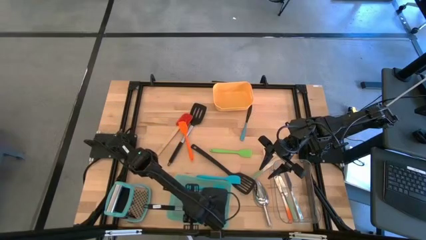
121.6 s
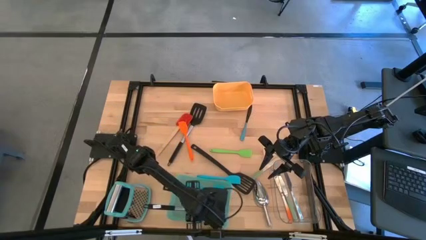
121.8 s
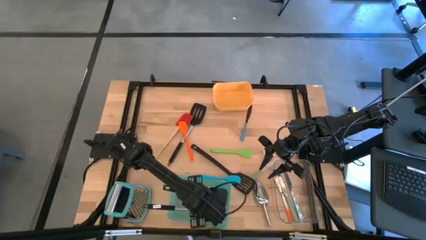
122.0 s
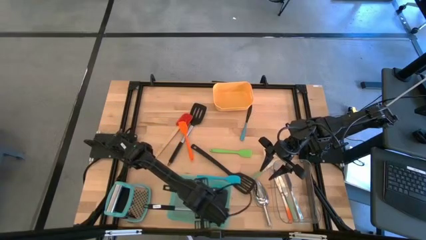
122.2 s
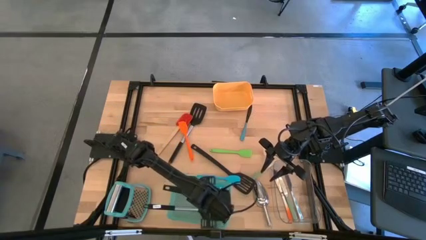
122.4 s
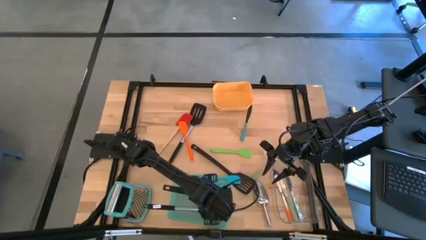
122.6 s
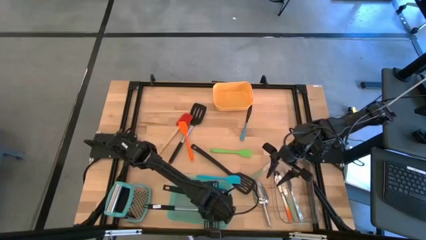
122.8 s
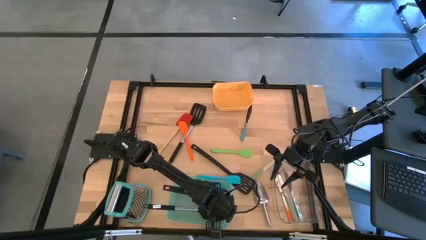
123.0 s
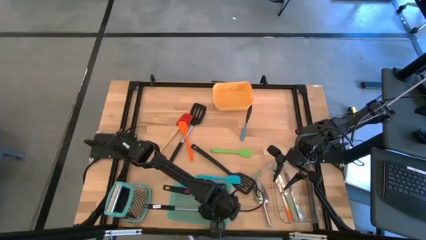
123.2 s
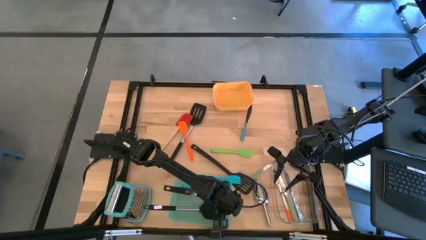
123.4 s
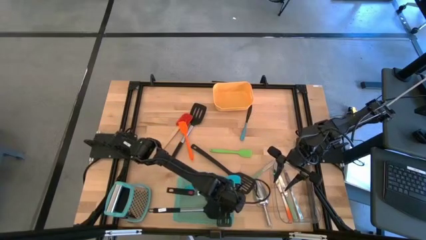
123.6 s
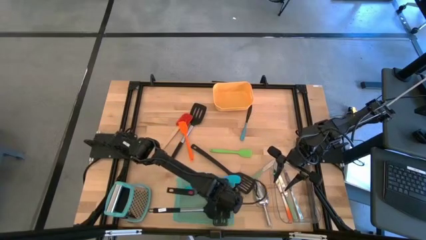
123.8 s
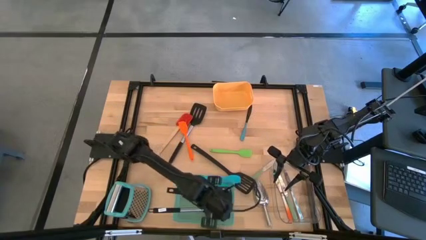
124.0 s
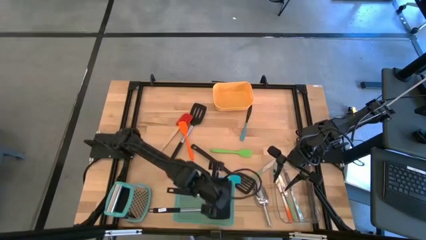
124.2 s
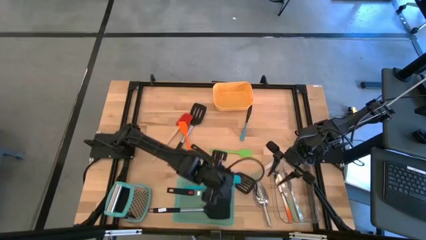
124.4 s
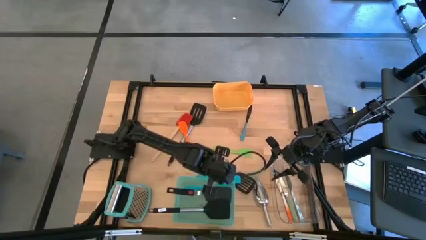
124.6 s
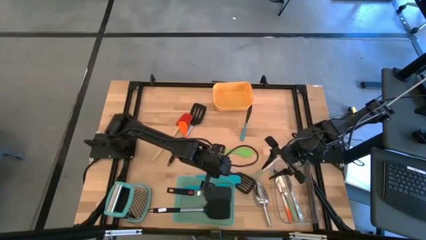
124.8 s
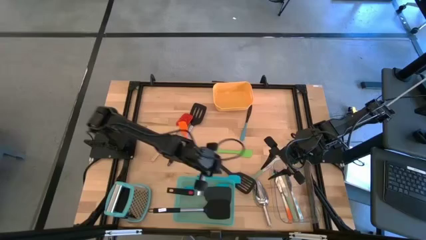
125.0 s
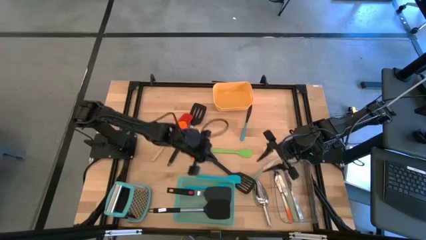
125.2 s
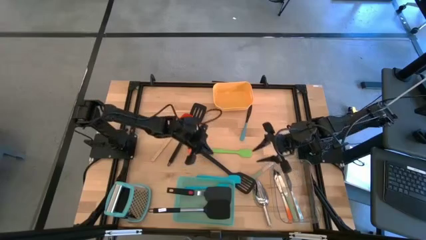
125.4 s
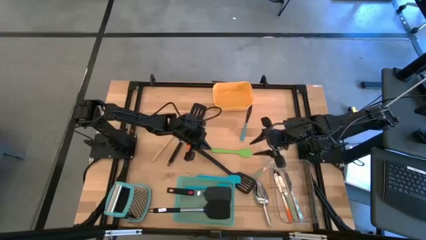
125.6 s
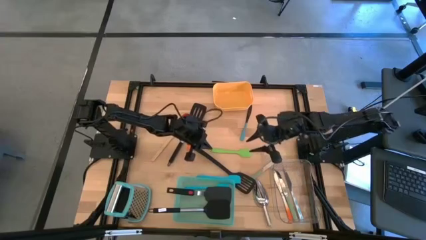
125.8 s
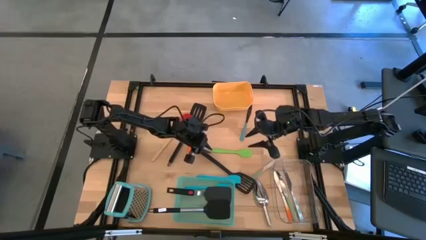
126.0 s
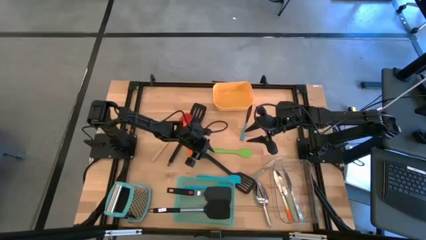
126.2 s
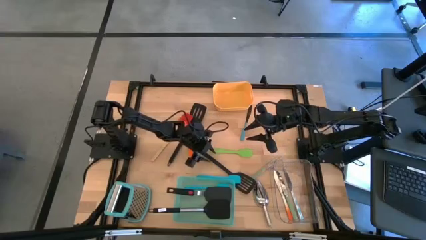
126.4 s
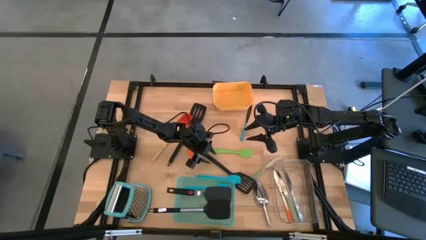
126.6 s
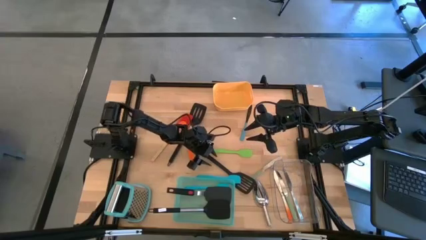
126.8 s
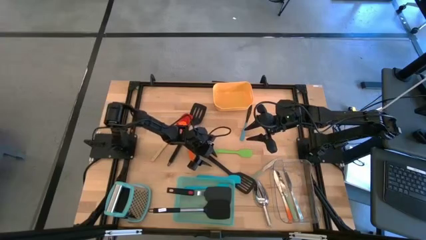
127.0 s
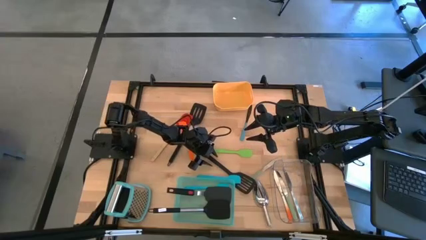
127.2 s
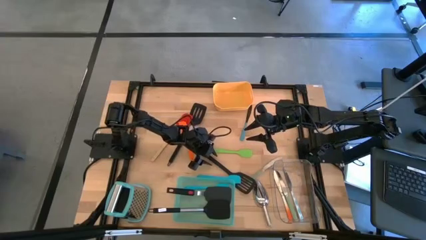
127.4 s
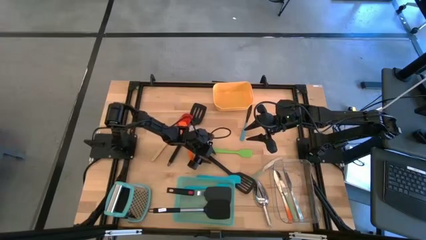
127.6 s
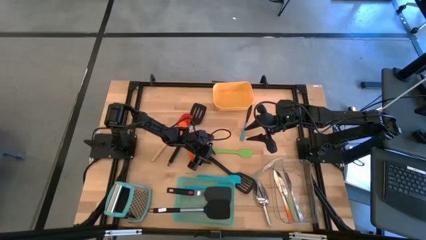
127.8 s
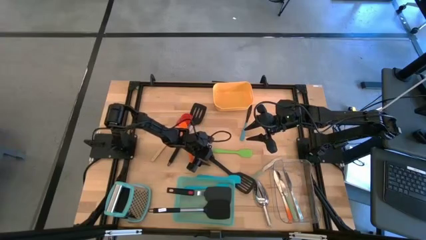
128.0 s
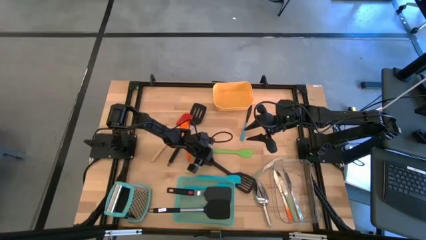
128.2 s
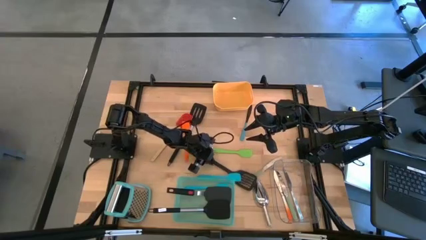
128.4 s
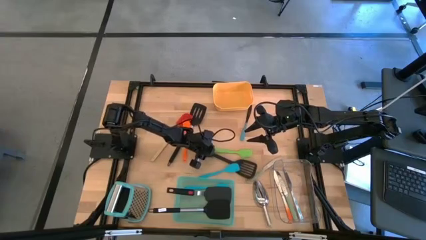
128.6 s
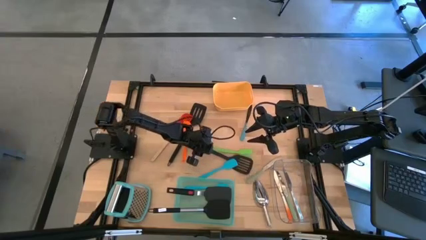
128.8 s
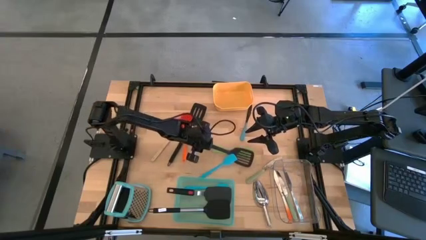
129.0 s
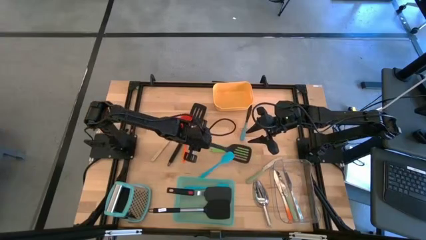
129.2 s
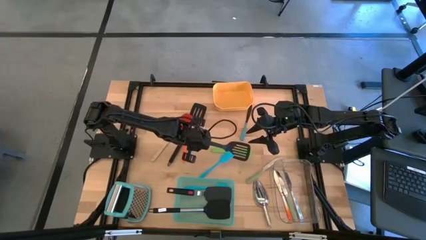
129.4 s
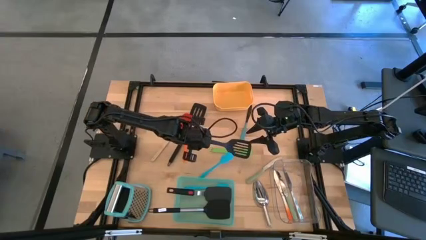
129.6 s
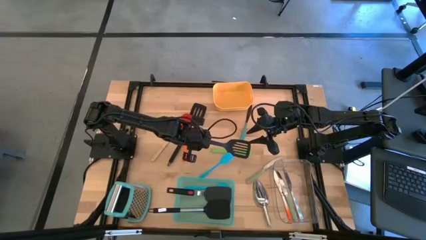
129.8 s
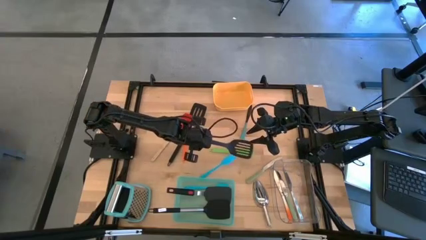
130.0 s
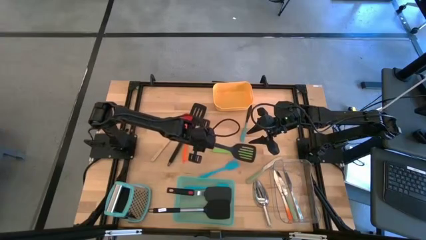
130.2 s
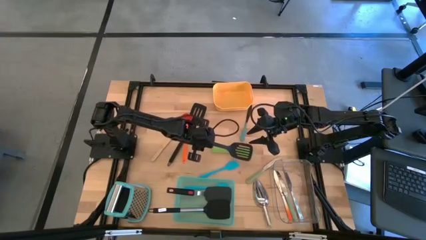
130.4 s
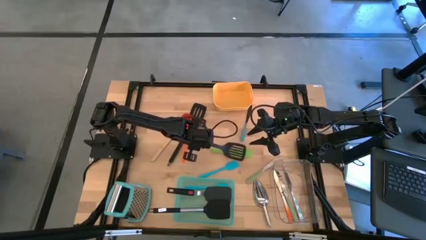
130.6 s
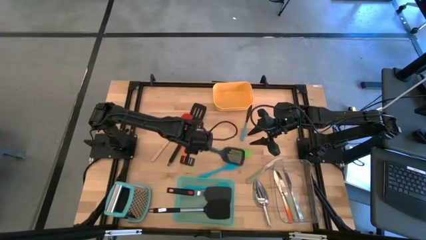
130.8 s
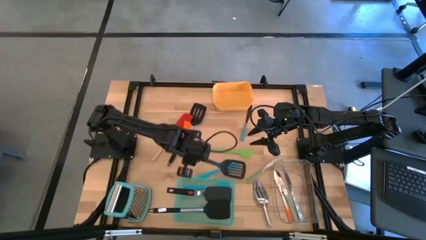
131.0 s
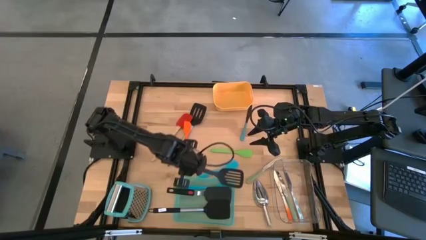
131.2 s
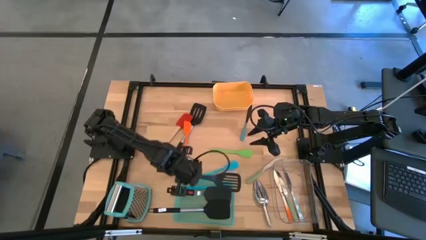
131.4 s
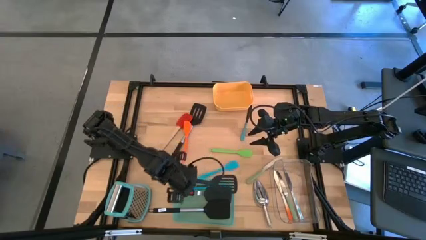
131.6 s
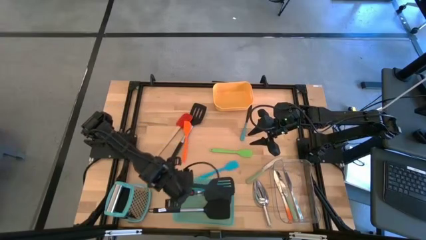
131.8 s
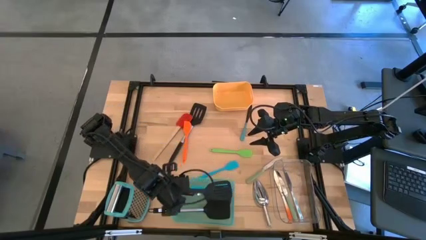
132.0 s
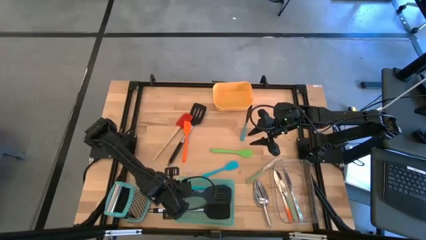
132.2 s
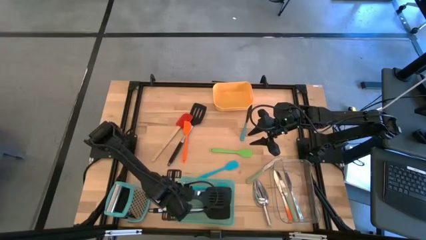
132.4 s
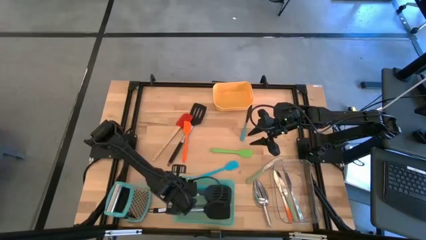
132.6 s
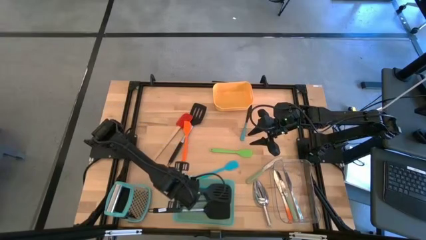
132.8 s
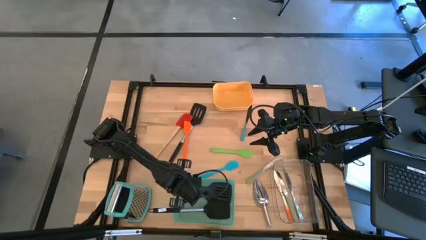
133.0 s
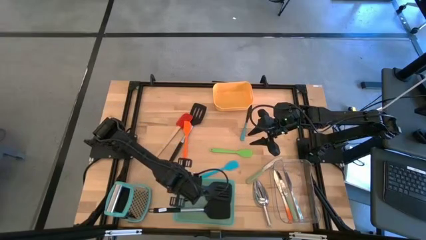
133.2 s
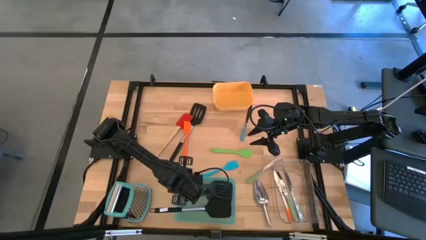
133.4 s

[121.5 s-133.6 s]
Task: Pick & Place Kitchen Items
Put the black spatula into the blue bin
